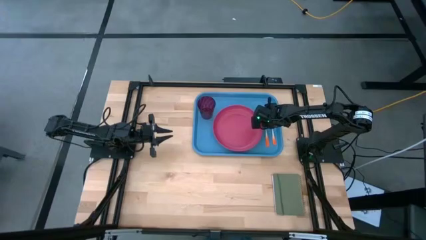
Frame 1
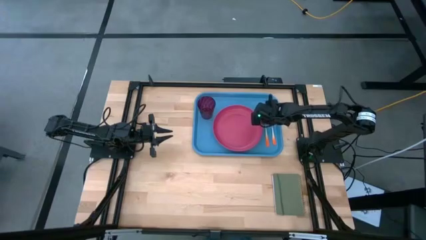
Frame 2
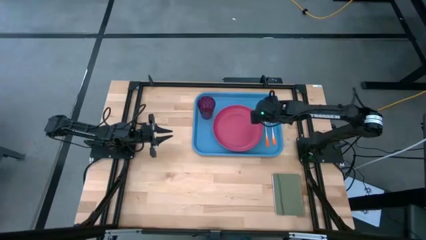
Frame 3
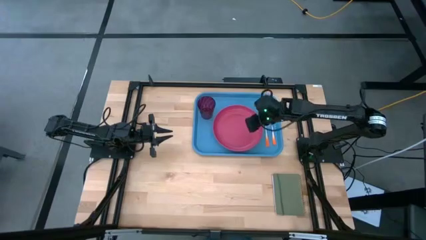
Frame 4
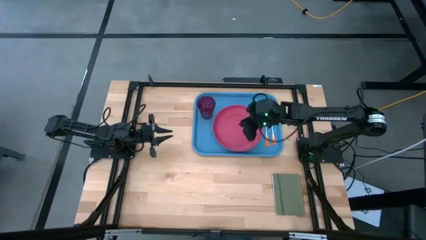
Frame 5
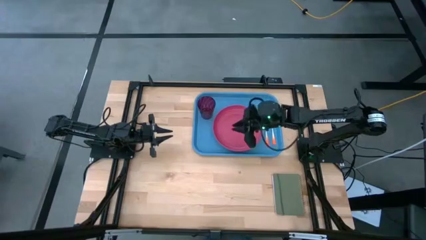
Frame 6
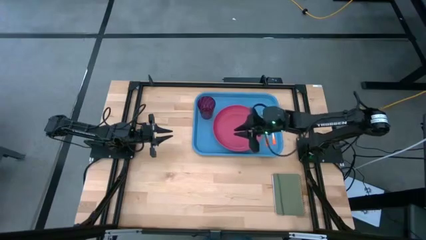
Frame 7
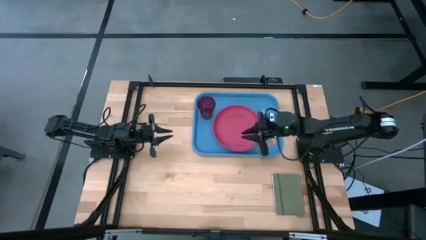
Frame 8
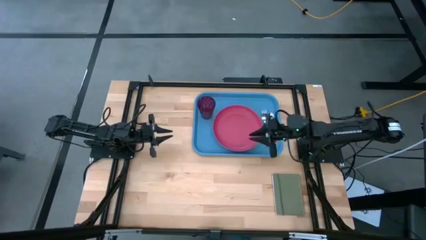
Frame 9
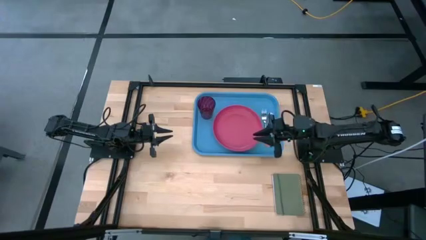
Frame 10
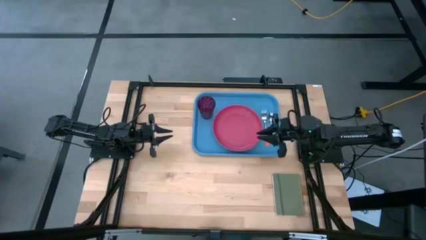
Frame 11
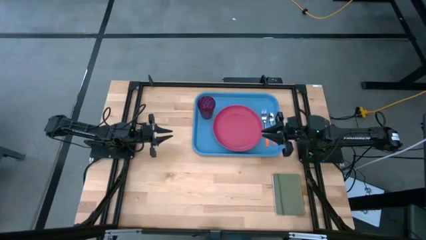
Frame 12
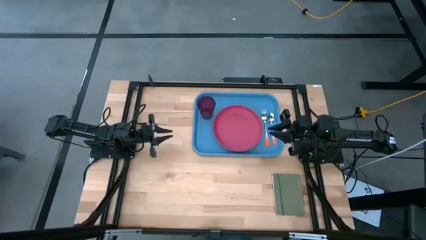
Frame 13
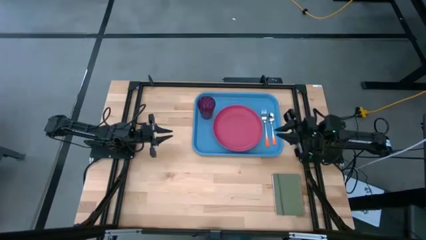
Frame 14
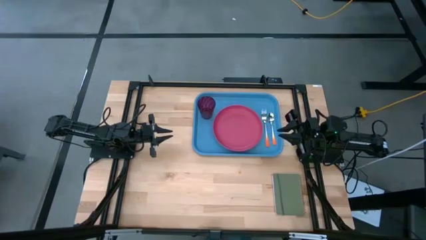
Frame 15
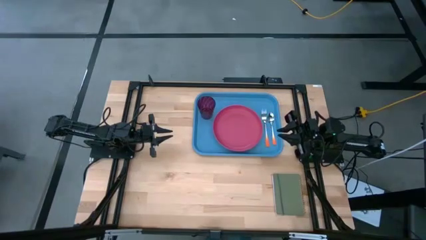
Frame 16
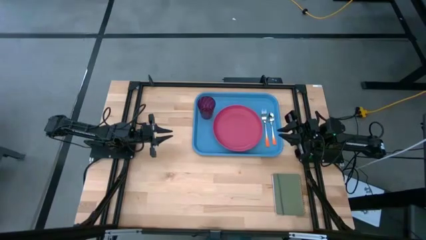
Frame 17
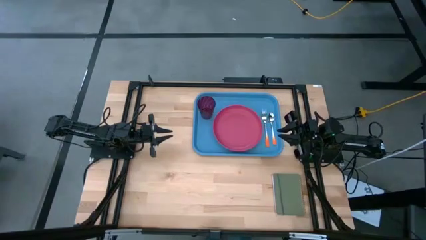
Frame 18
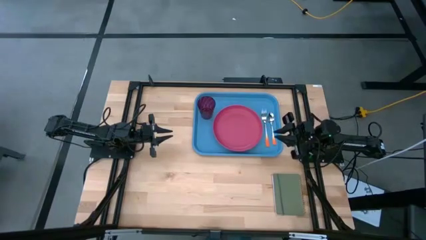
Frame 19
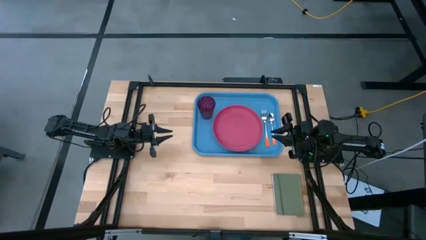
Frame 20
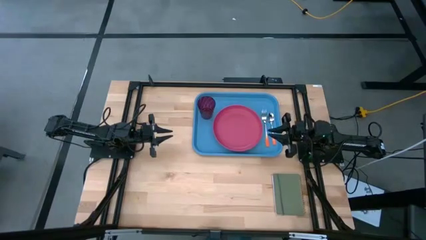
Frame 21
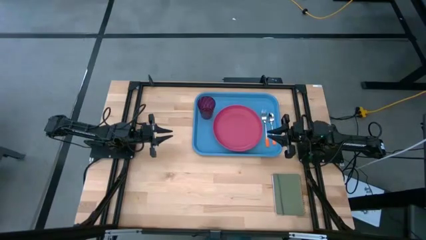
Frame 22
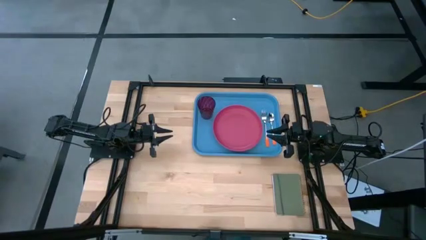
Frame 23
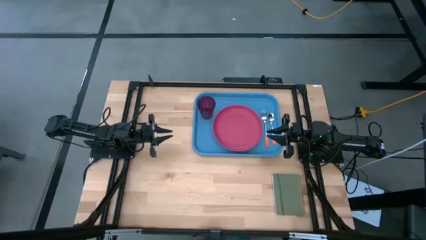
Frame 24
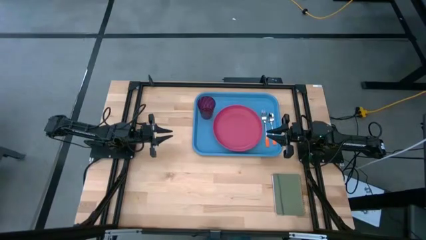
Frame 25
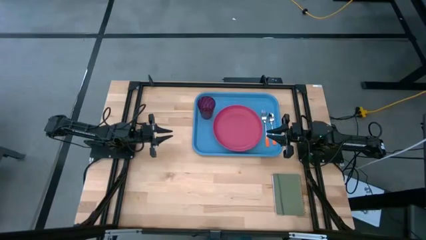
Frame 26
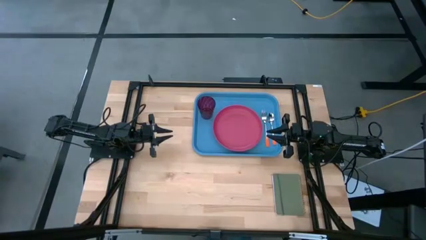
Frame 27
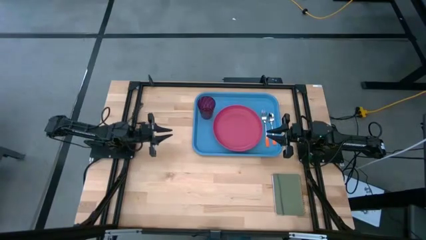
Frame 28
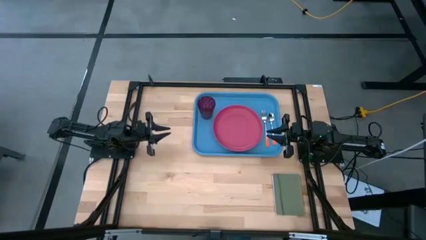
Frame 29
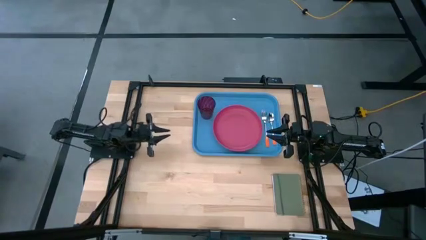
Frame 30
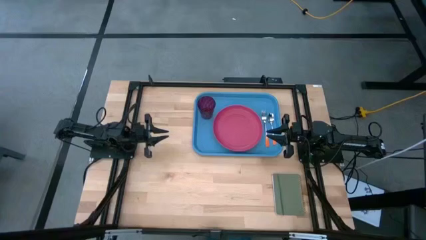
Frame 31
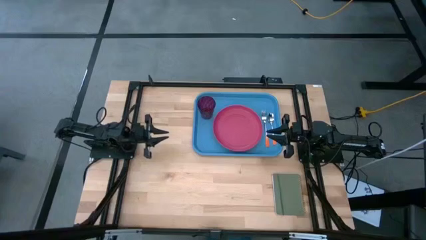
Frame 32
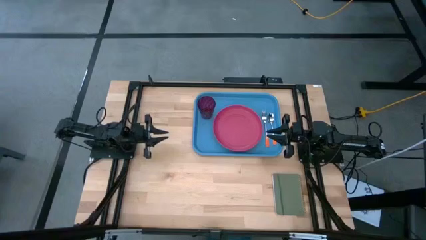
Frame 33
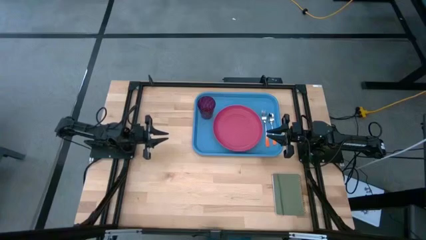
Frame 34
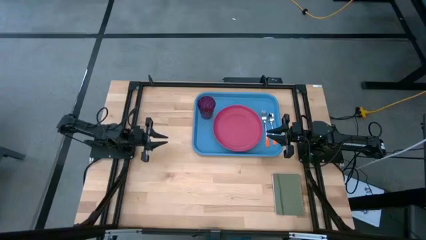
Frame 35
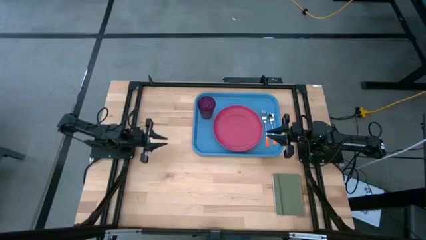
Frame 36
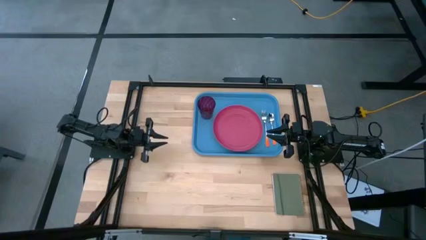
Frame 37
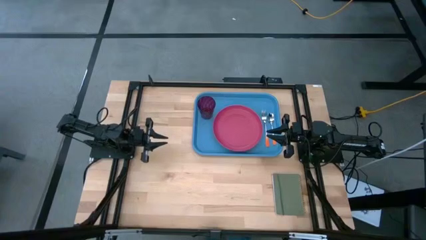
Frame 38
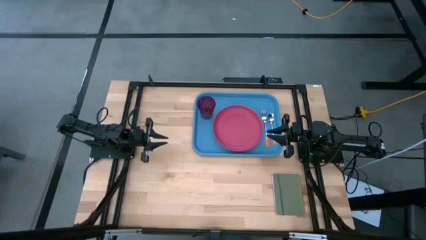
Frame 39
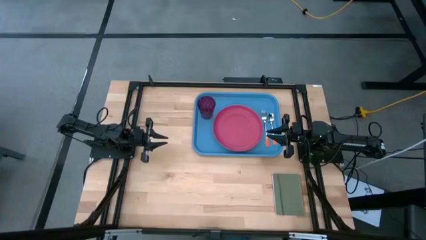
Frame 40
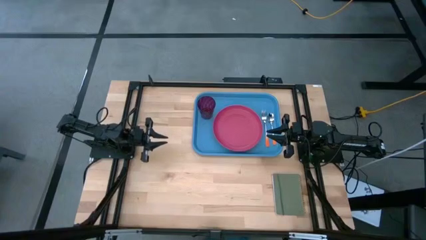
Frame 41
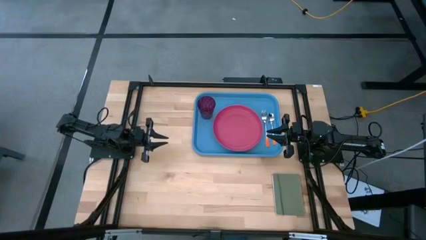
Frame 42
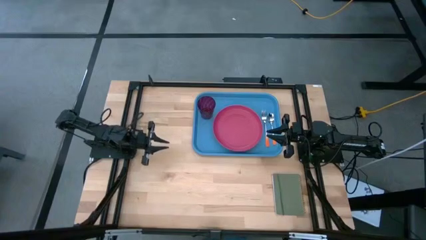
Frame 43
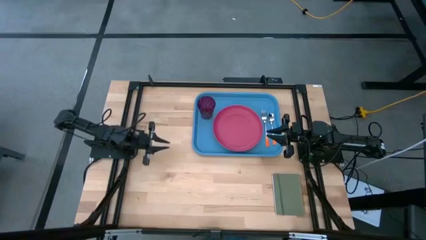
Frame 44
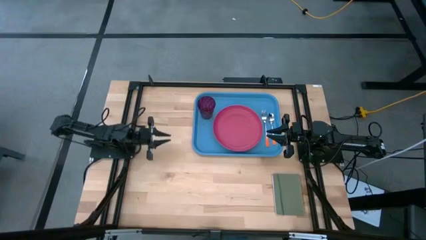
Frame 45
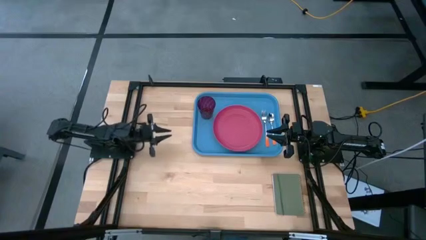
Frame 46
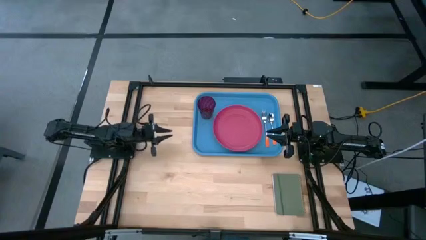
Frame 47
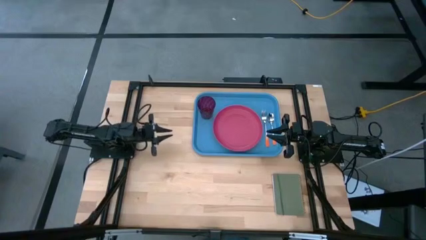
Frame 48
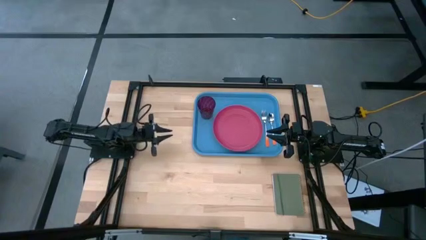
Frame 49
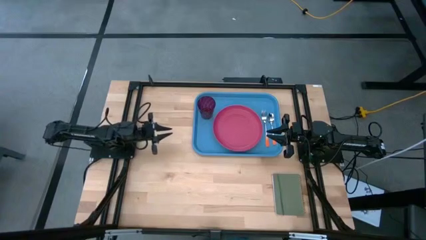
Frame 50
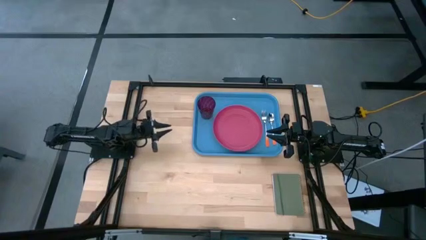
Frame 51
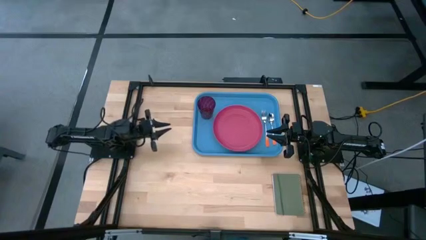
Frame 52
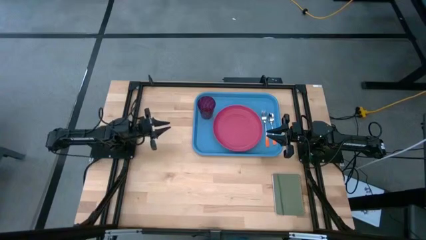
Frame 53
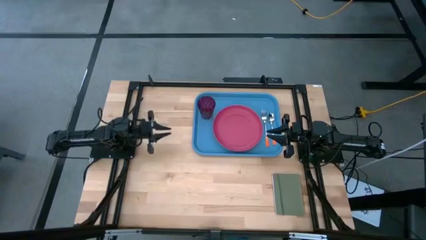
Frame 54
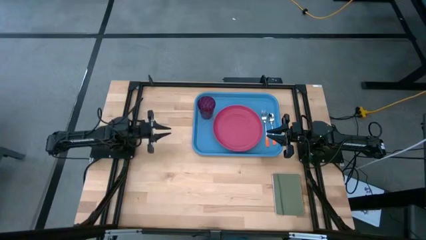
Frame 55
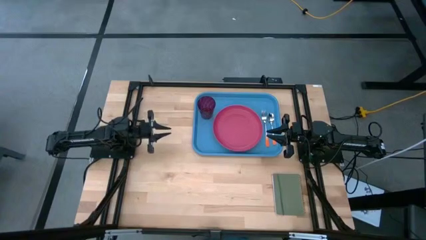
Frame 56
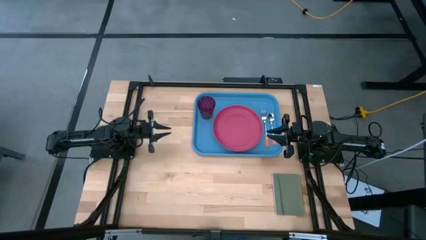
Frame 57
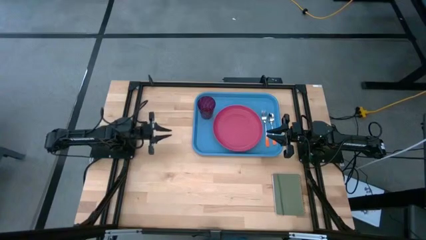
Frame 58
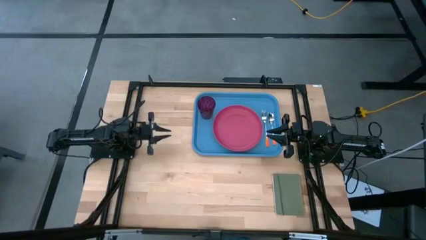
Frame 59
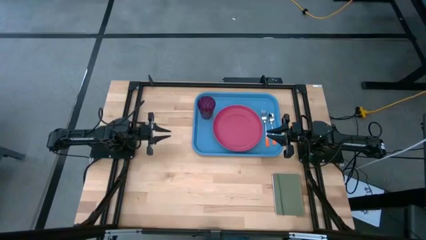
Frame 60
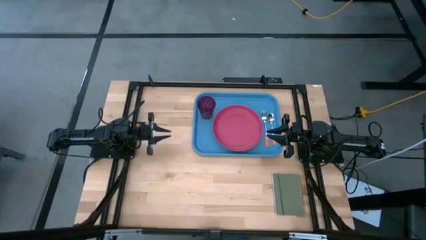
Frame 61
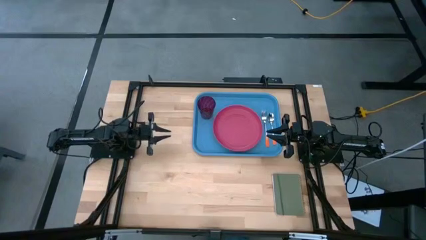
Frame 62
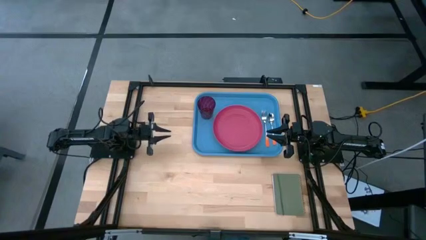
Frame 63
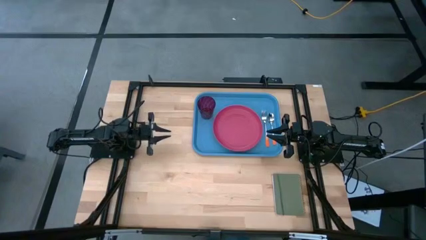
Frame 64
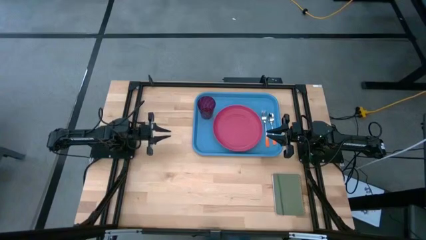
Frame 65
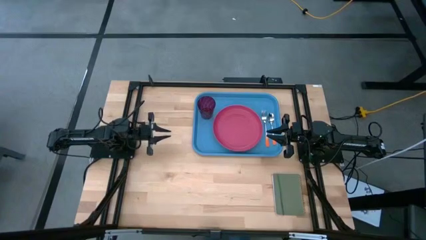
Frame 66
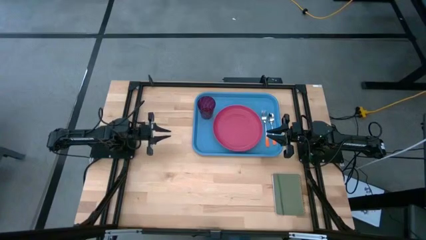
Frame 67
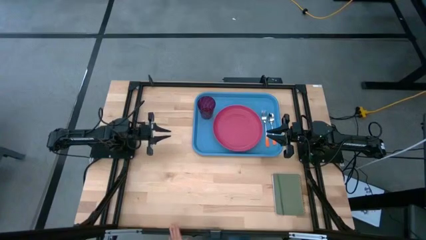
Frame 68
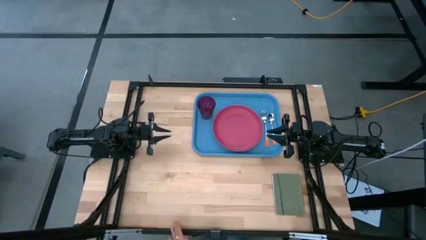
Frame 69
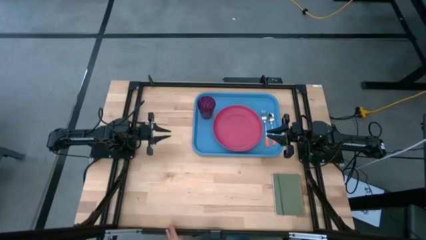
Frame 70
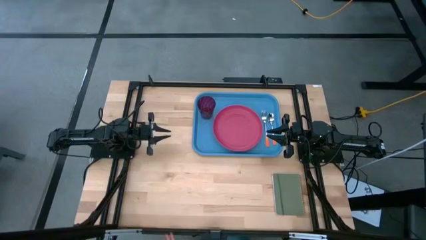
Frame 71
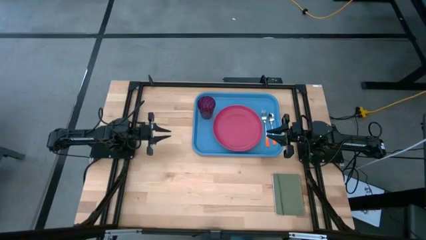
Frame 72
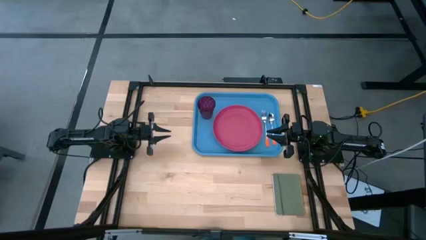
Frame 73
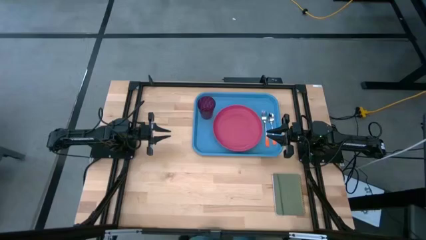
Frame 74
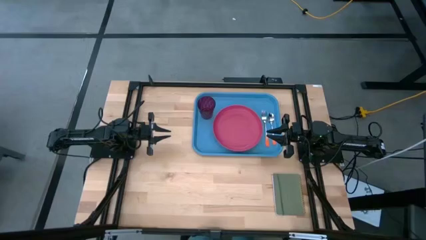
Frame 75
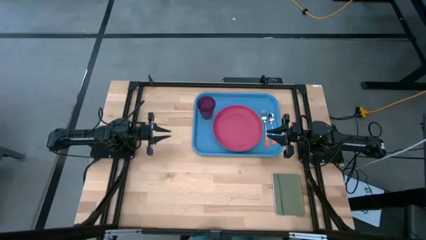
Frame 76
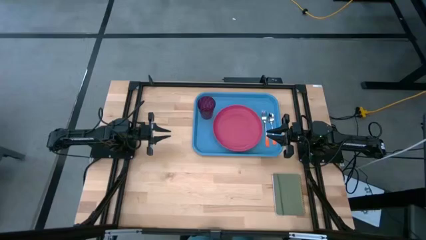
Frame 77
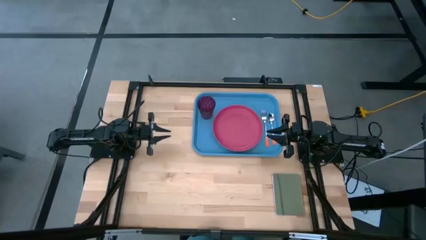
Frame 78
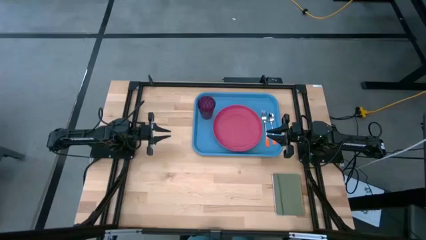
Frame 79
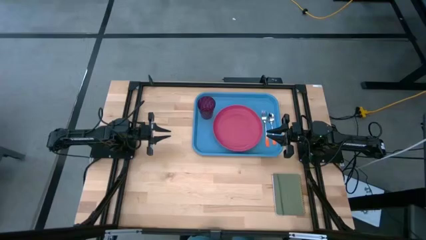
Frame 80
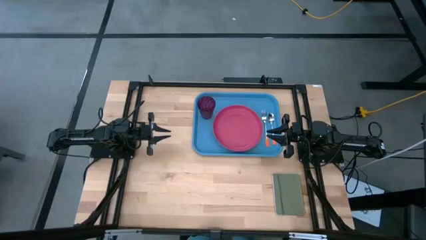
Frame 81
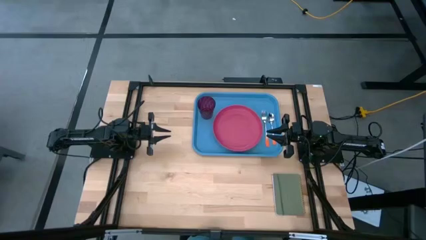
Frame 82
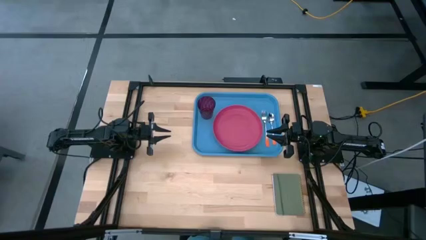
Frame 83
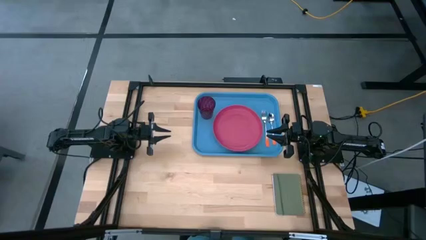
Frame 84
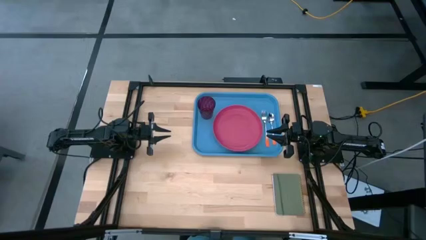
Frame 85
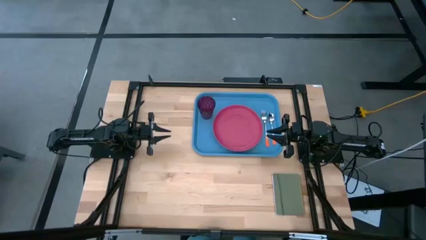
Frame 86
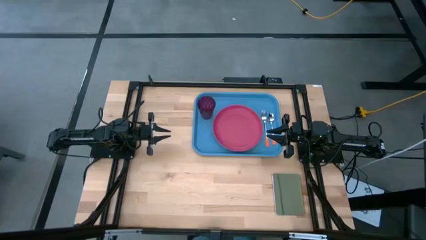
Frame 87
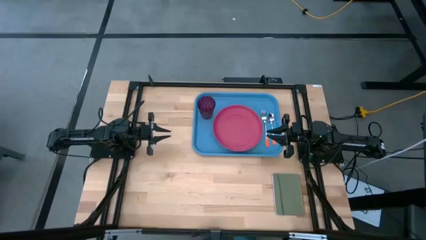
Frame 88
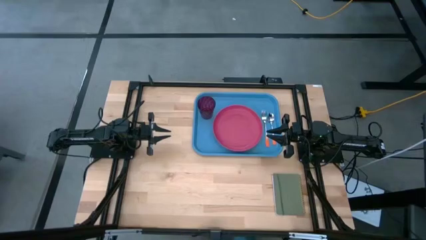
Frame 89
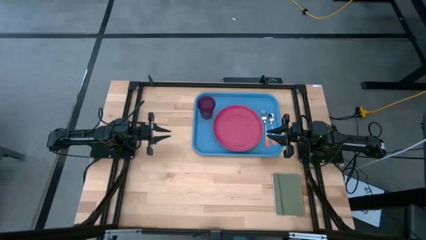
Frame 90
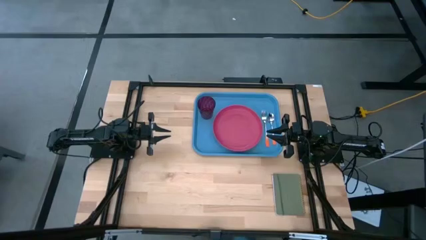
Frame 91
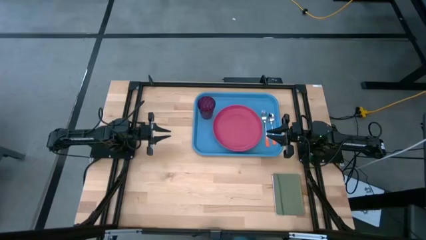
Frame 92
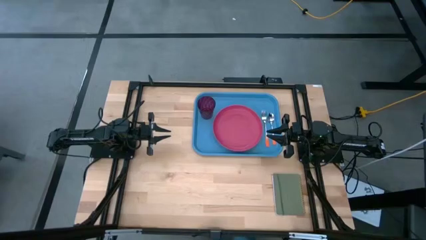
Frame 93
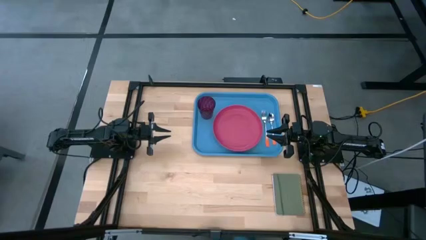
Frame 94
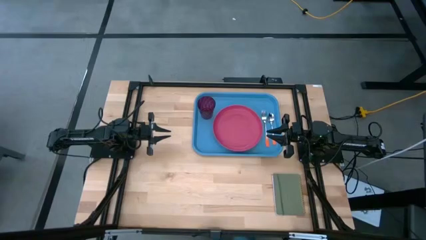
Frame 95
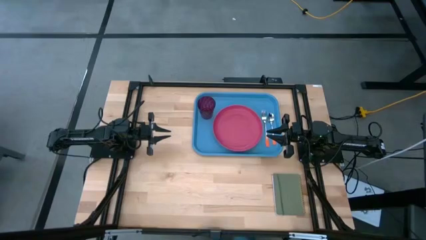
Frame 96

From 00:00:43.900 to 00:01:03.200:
Task: Pick and place plate/cup/fork/spoon on tray
Return to Home Position
